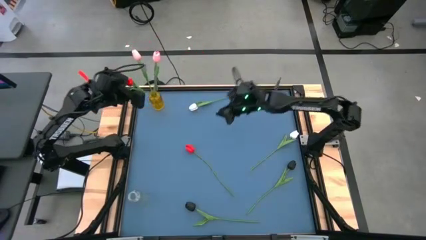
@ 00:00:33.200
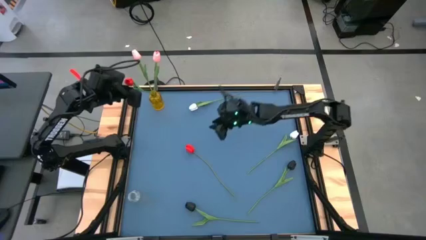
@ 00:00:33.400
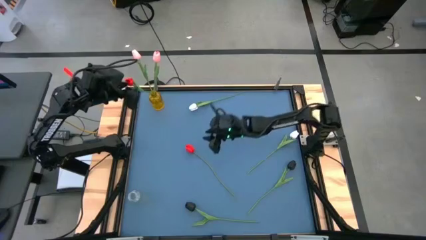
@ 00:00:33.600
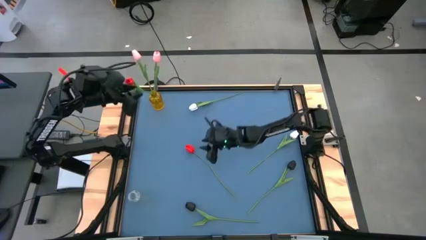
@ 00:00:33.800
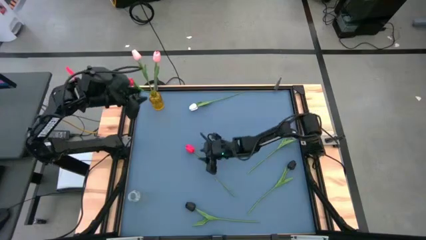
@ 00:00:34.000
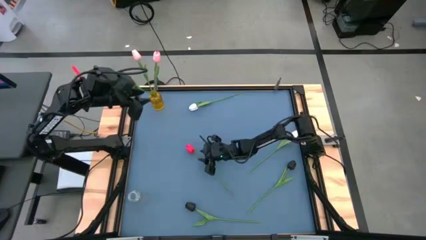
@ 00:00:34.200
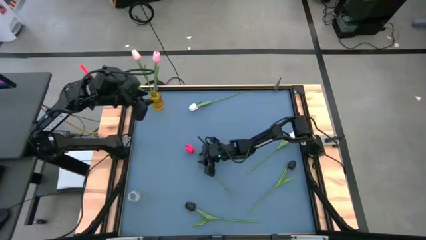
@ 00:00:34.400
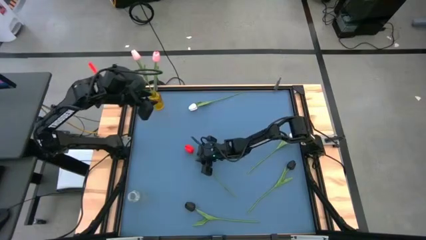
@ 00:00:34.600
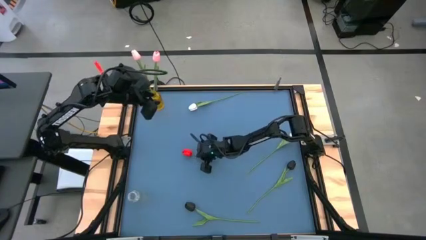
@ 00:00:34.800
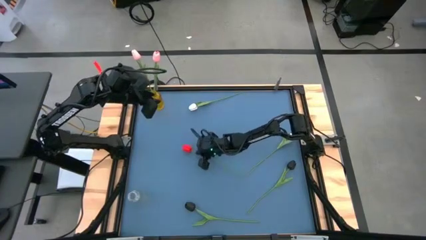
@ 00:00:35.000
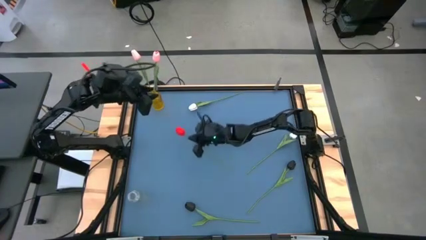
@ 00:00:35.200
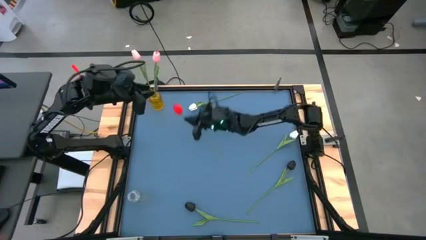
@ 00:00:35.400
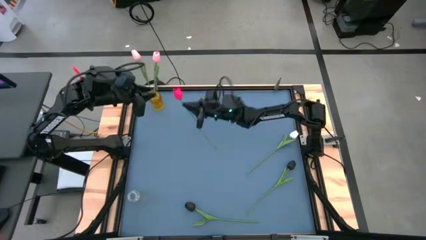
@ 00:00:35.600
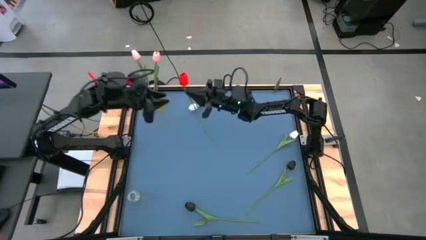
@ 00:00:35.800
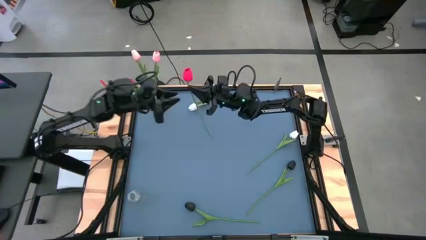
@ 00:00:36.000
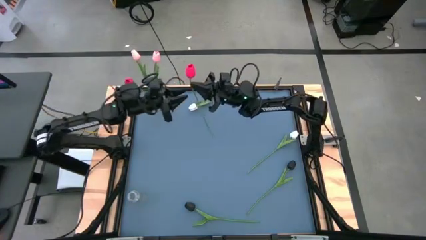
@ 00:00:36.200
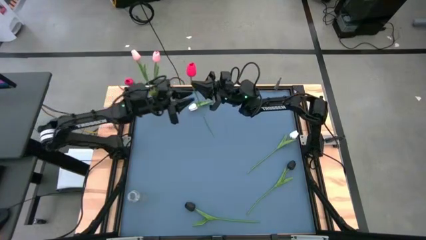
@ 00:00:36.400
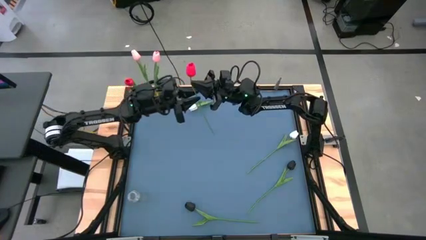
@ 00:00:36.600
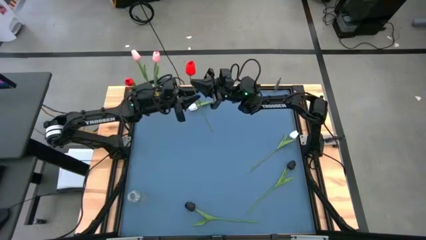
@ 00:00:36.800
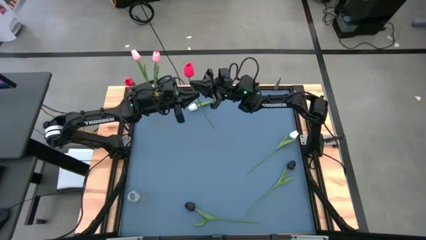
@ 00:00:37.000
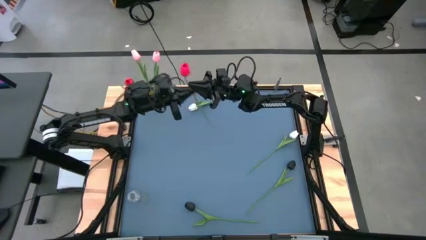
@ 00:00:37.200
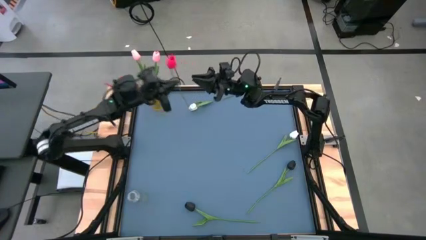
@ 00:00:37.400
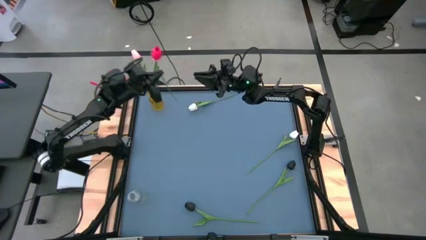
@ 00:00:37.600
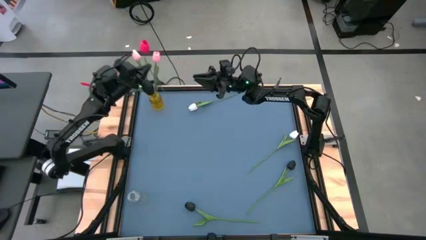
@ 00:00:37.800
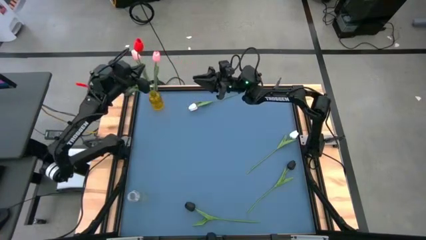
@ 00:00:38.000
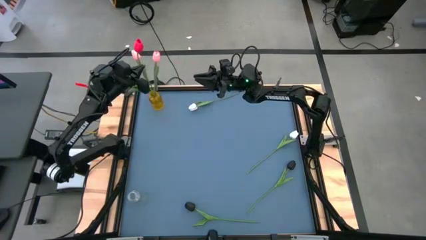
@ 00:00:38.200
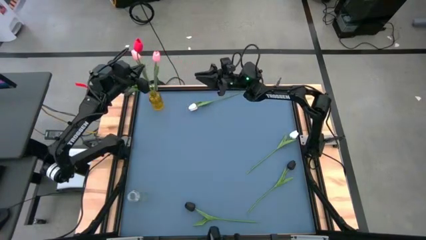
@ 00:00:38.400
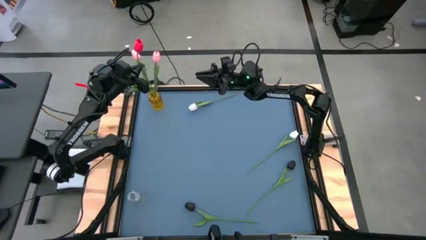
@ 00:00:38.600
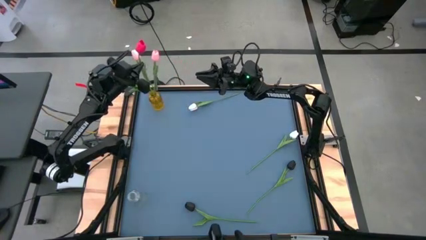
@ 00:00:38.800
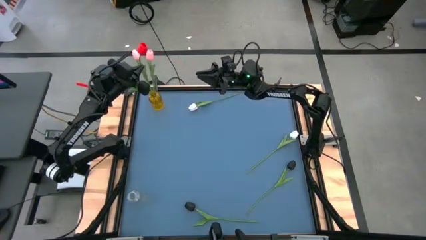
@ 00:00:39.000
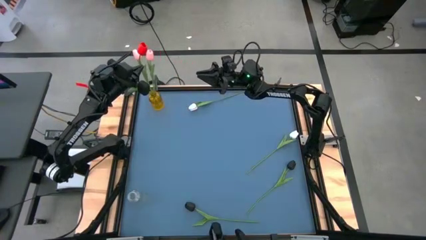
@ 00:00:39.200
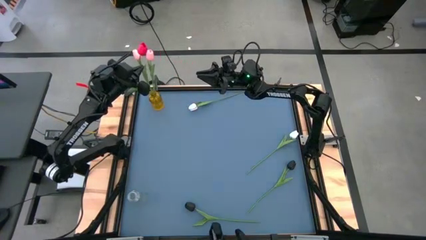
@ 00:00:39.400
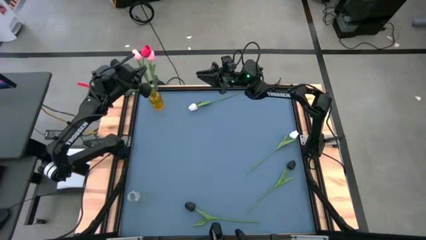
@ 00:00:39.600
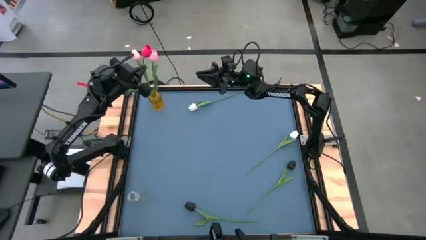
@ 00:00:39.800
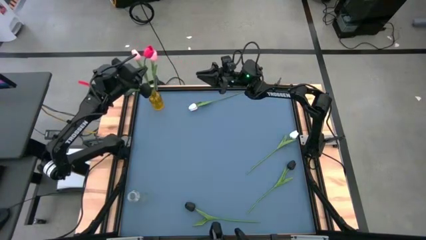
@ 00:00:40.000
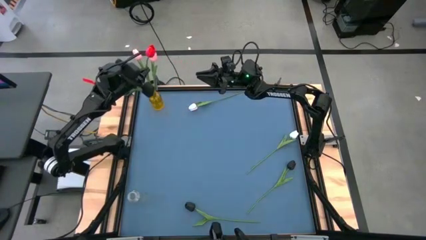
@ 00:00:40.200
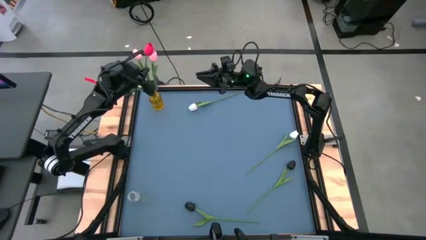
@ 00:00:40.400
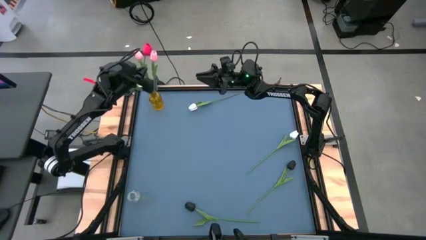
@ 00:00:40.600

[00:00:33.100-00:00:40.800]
Task: Sort flowers into vase by color
Put the red flower into the yellow vase

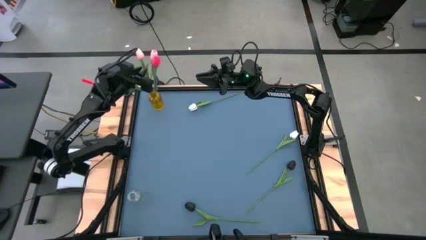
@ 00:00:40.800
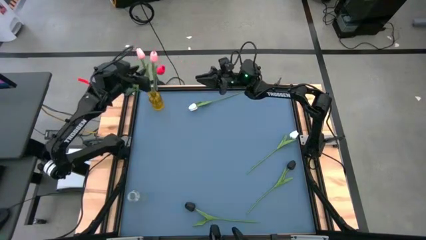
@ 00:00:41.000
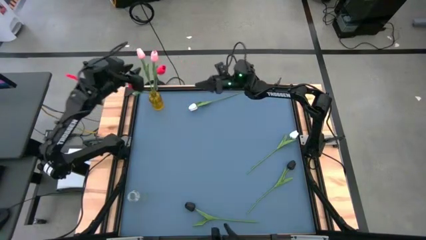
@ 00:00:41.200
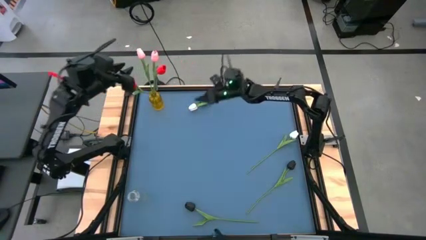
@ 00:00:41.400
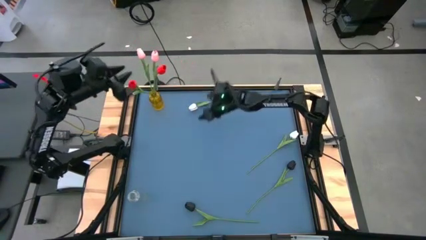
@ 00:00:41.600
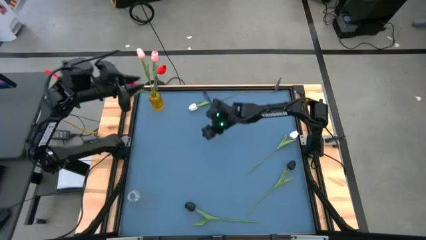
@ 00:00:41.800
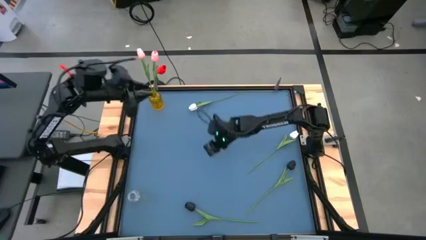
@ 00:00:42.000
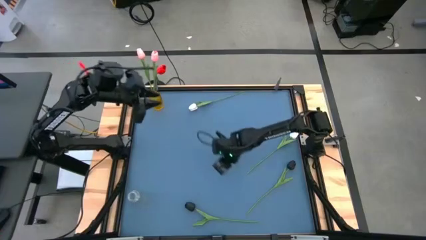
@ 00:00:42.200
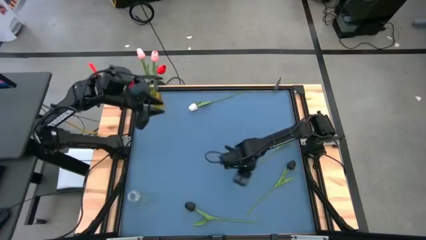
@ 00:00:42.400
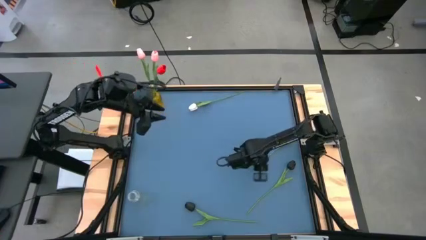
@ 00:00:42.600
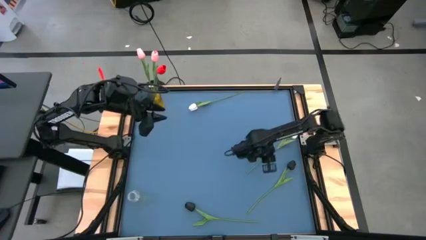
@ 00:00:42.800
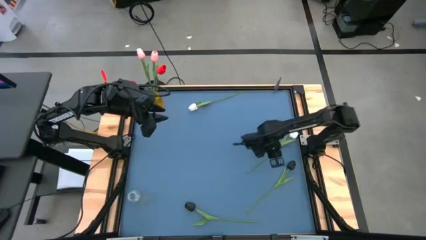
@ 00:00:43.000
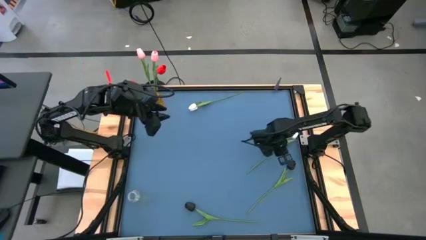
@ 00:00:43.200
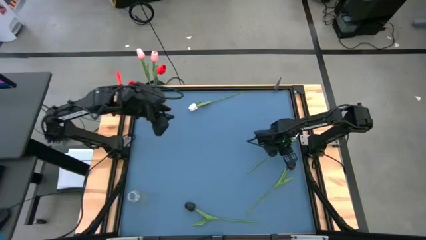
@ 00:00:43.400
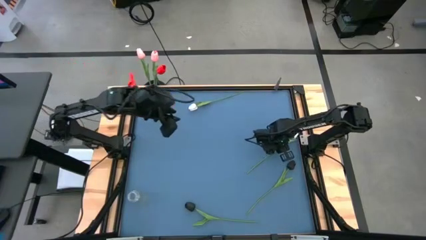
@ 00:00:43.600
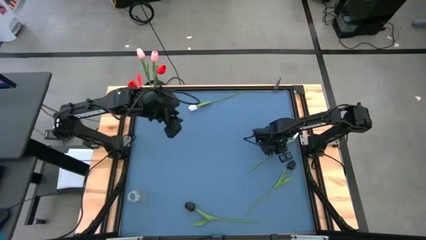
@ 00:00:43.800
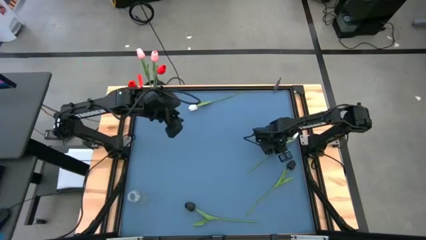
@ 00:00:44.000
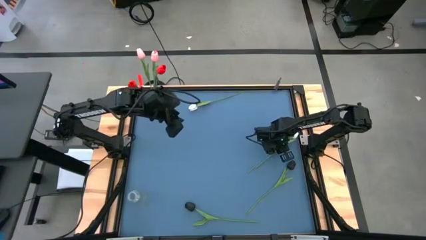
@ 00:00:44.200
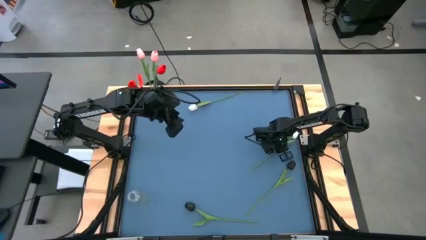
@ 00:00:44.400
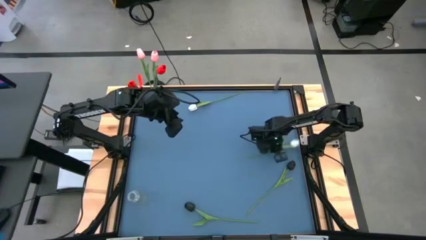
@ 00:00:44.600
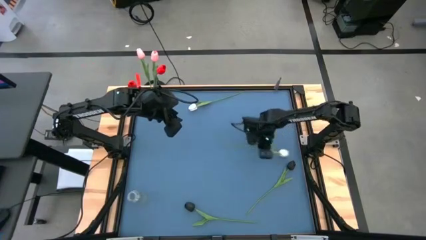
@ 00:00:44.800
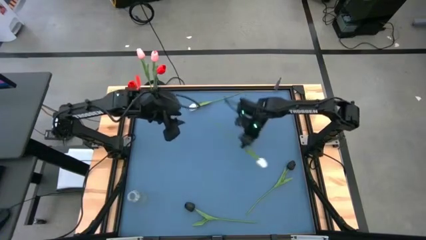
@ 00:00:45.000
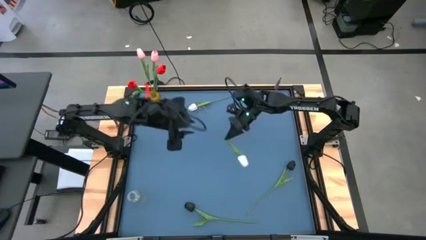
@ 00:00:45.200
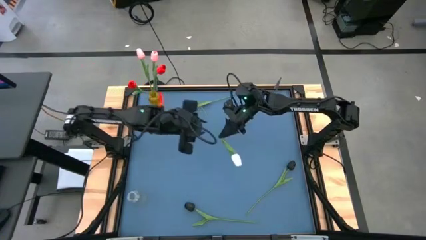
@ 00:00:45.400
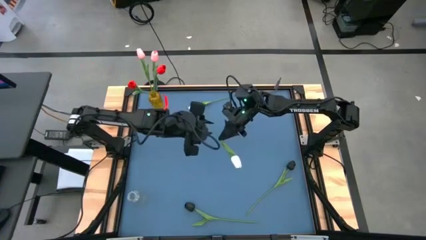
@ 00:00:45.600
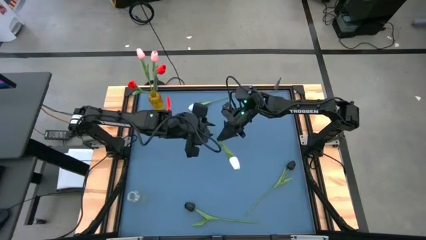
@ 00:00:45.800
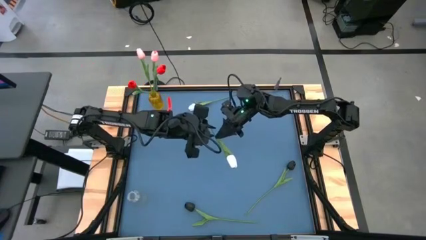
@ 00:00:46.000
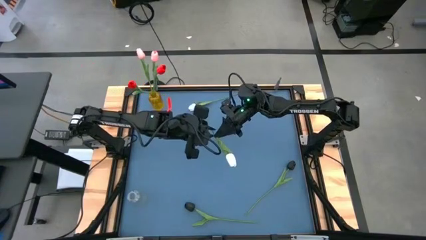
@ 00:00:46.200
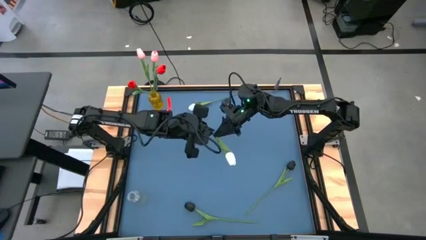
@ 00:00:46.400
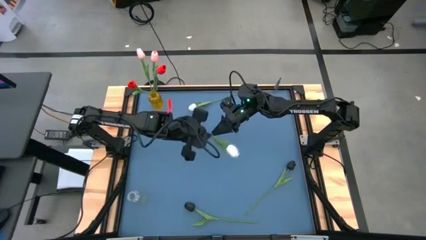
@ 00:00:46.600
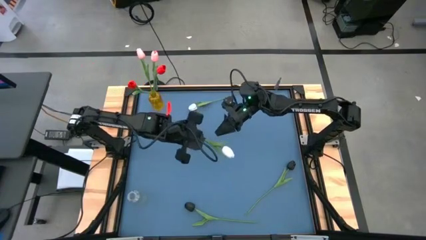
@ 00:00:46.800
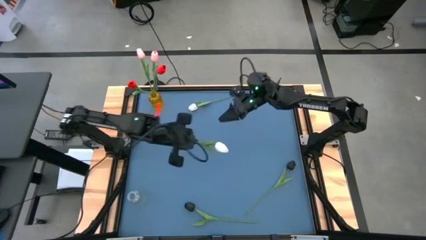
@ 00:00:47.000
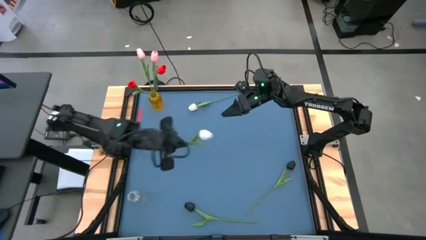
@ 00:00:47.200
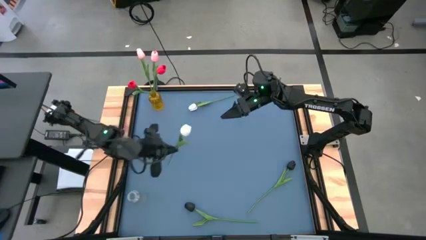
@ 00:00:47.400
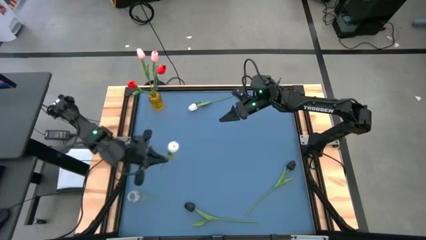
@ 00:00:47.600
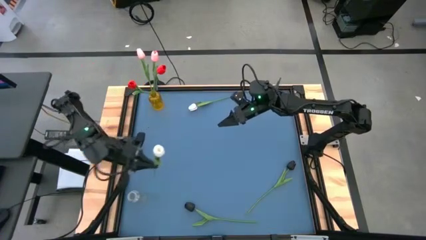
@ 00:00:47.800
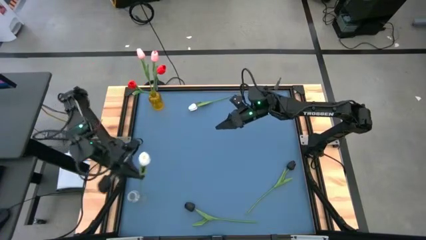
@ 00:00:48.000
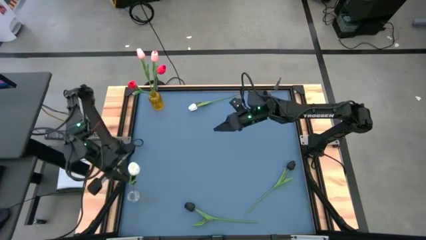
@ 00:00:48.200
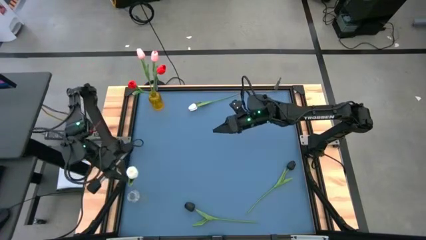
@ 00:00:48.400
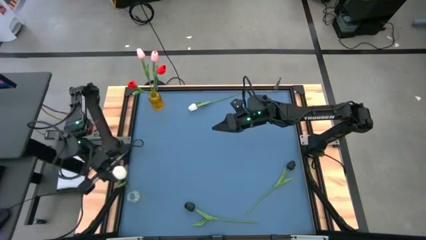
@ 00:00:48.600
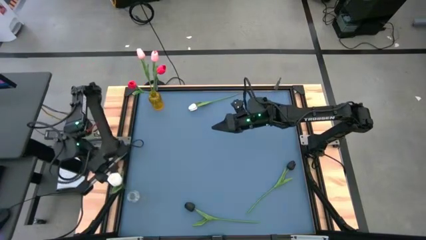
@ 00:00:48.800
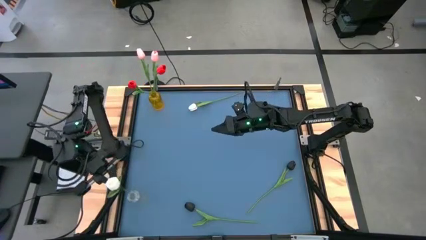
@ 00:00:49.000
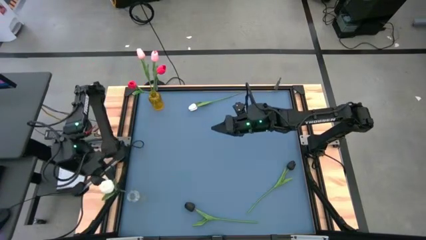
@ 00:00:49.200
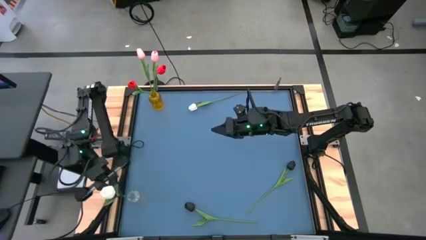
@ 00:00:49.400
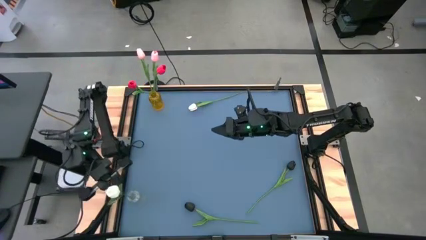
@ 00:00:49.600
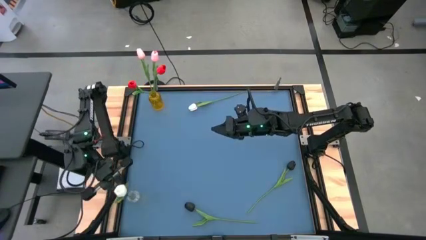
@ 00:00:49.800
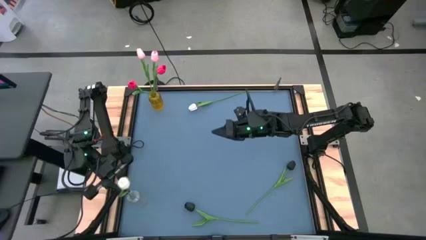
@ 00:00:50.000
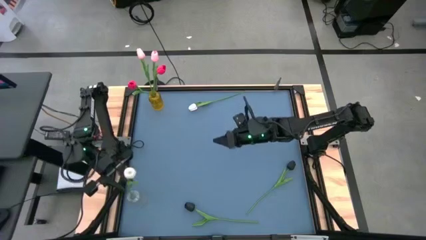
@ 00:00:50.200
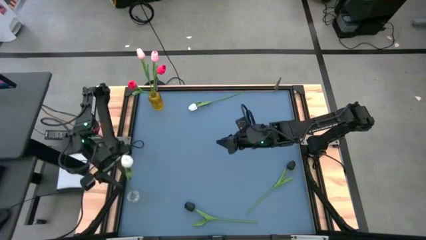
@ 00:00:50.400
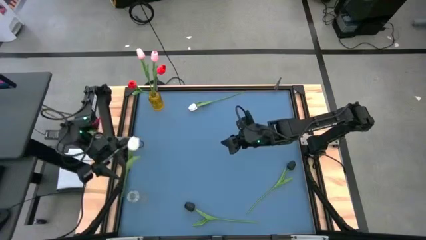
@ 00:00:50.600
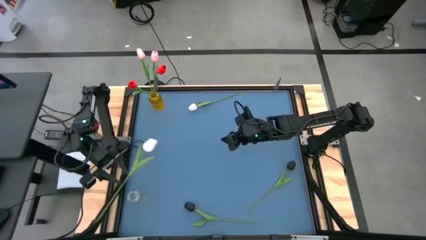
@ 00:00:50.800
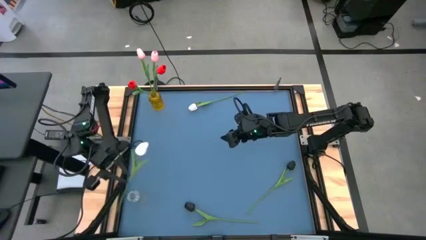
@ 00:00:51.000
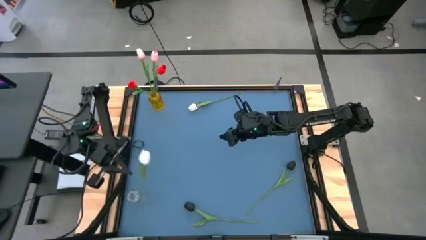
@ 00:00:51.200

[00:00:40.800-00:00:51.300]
Put the bottom white flower into the transparent vase
